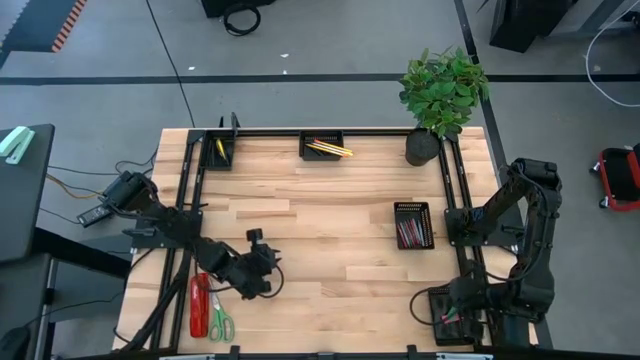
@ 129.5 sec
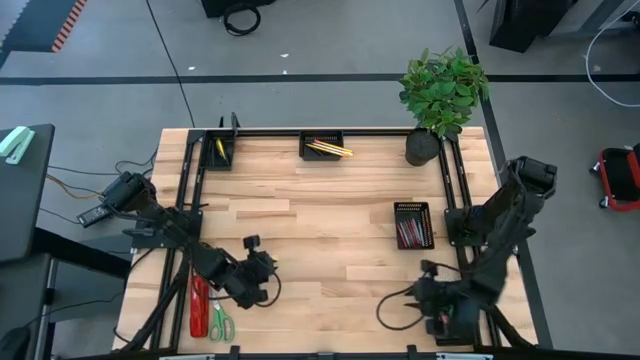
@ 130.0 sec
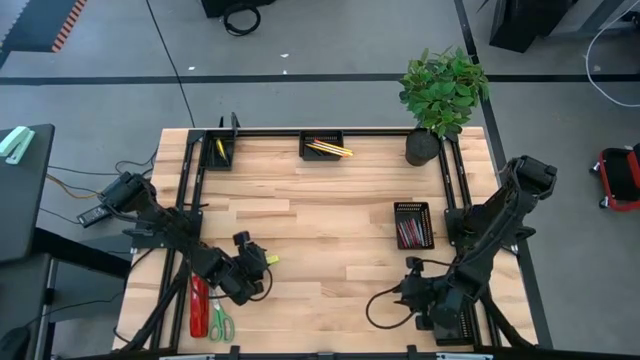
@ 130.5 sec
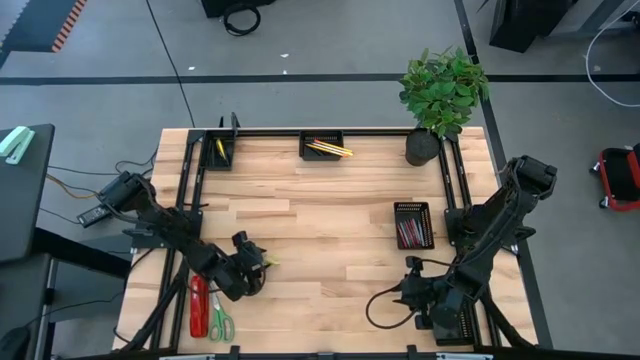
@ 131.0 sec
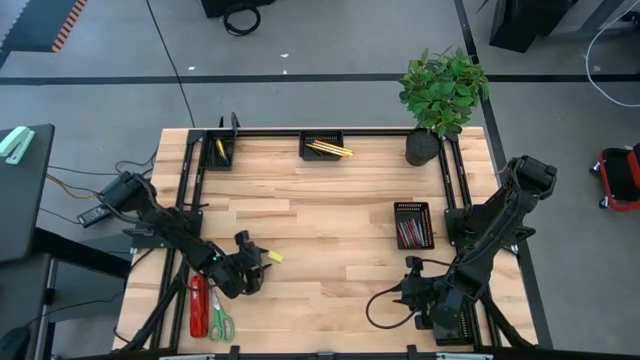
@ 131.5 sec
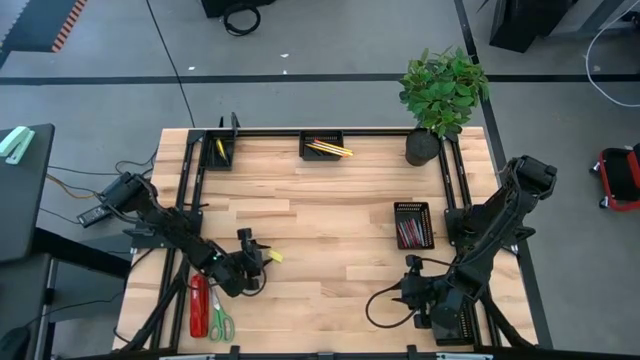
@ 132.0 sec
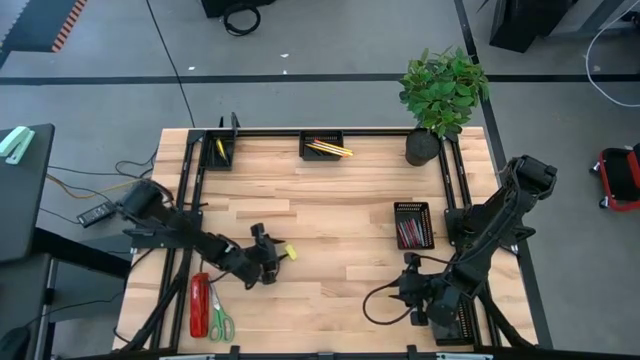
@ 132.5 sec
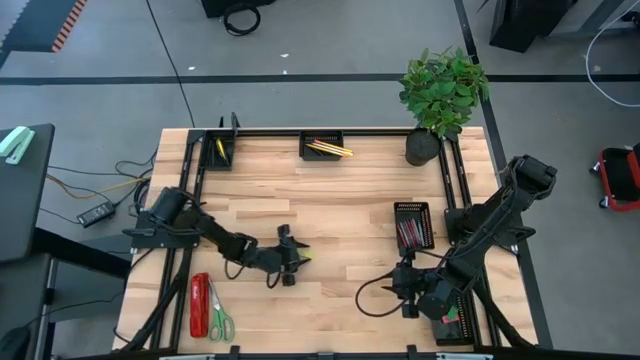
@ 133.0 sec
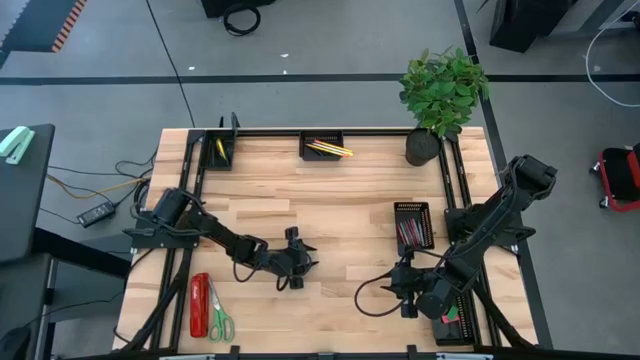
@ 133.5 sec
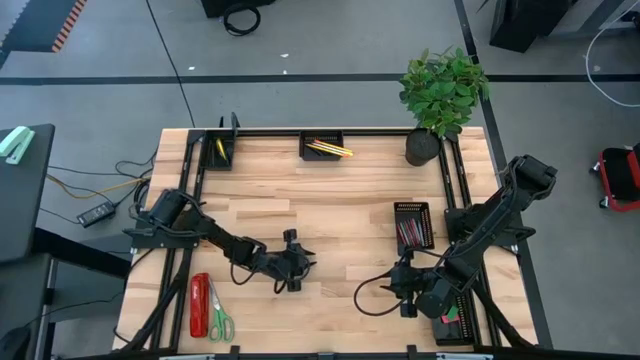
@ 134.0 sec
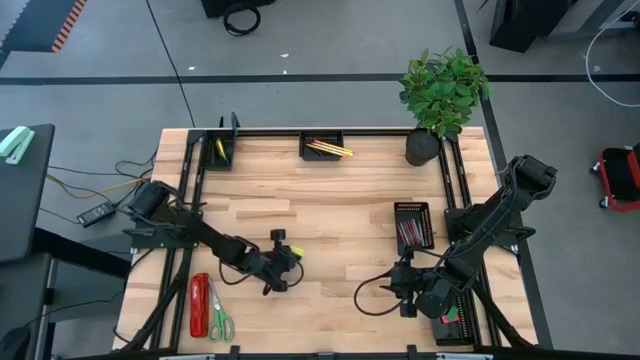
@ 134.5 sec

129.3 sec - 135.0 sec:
Task: Sort crayons/erasers/pens/pencils in bins
Put the light green eraser into the bottom right black bin

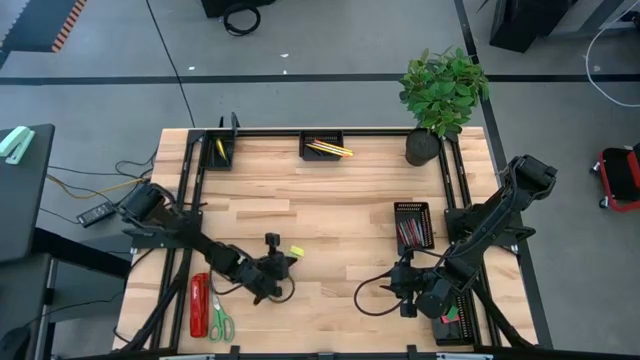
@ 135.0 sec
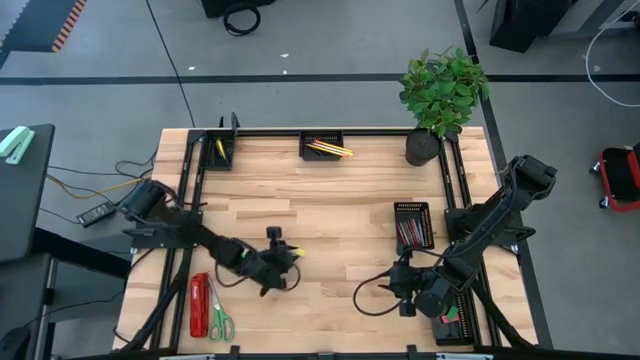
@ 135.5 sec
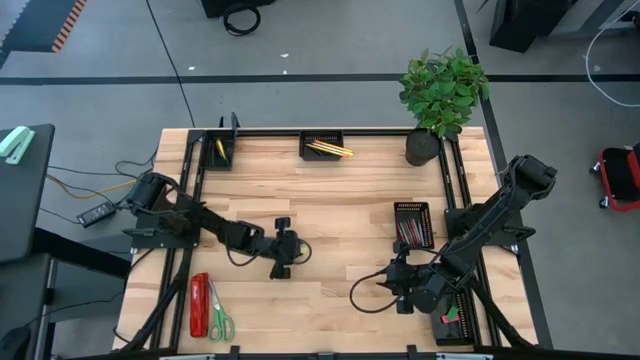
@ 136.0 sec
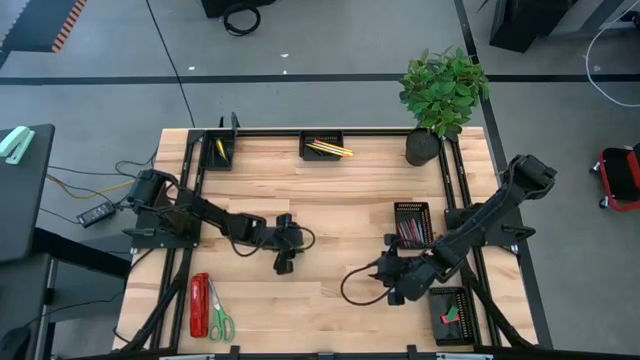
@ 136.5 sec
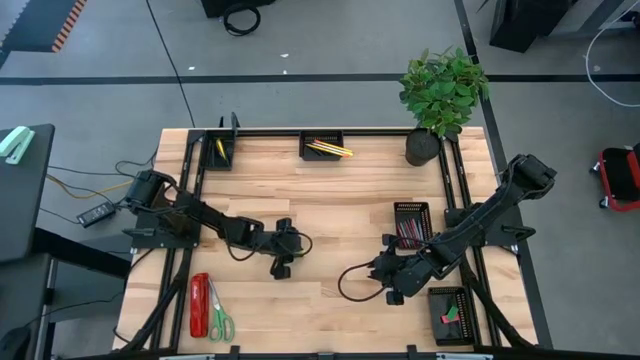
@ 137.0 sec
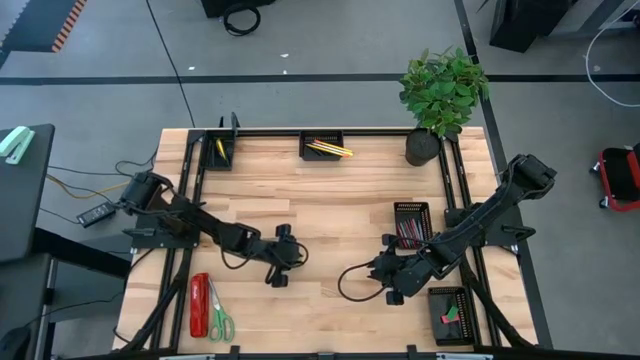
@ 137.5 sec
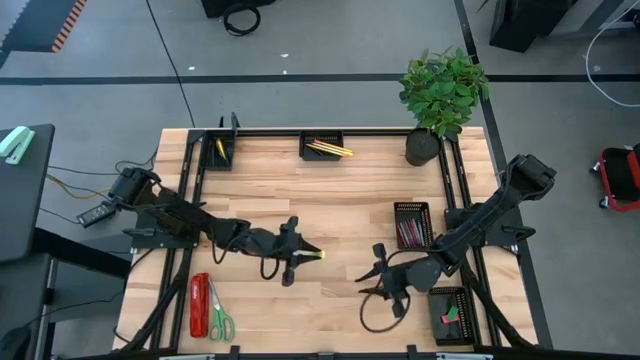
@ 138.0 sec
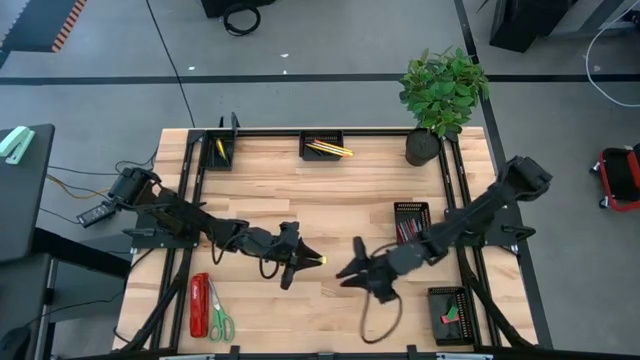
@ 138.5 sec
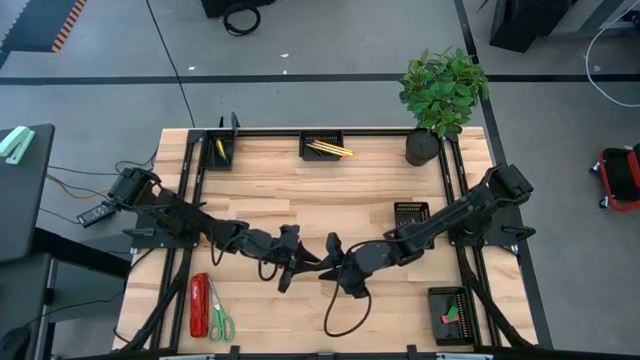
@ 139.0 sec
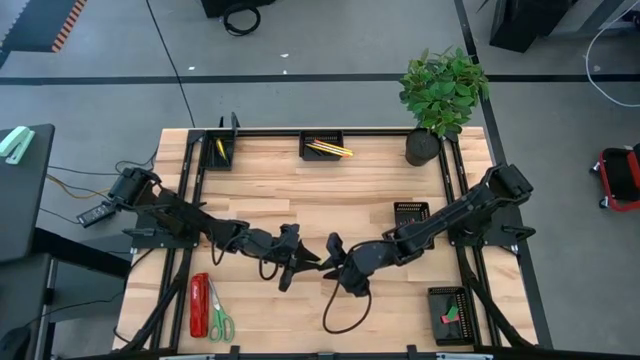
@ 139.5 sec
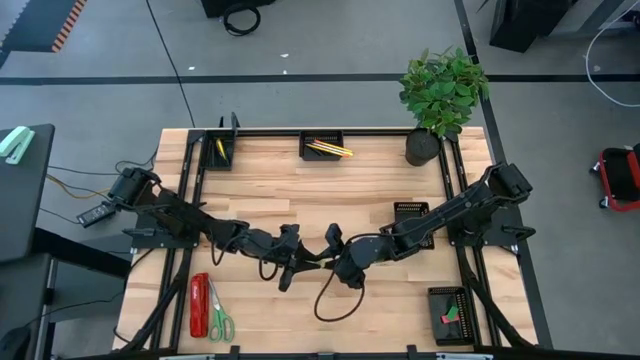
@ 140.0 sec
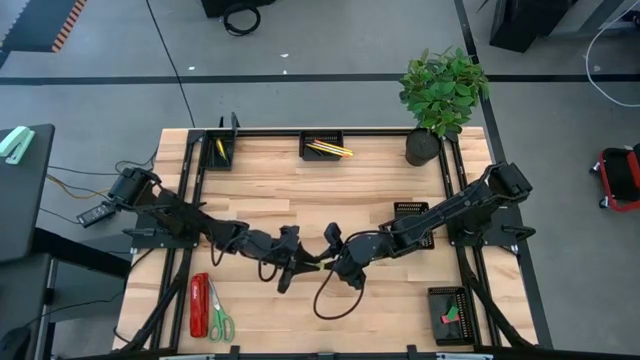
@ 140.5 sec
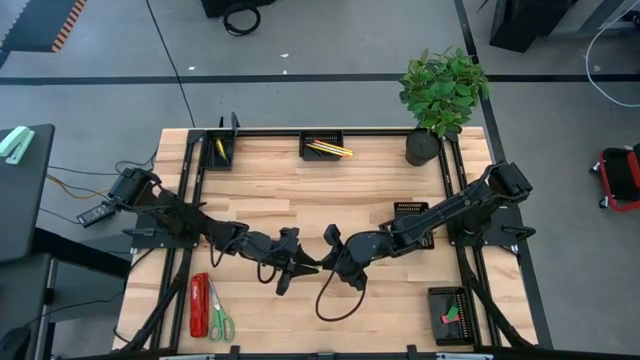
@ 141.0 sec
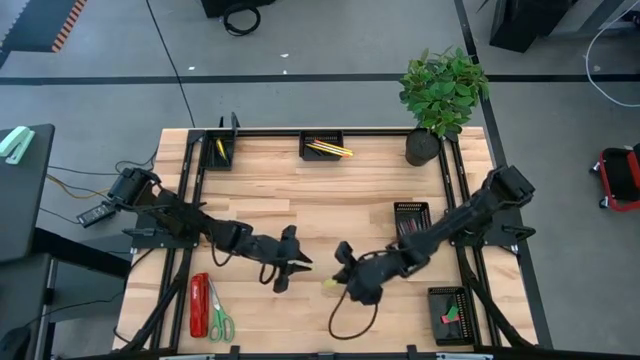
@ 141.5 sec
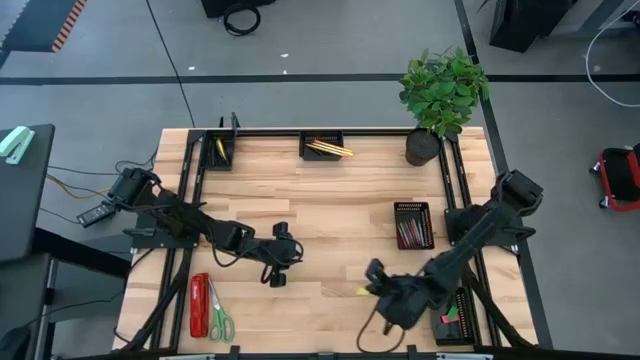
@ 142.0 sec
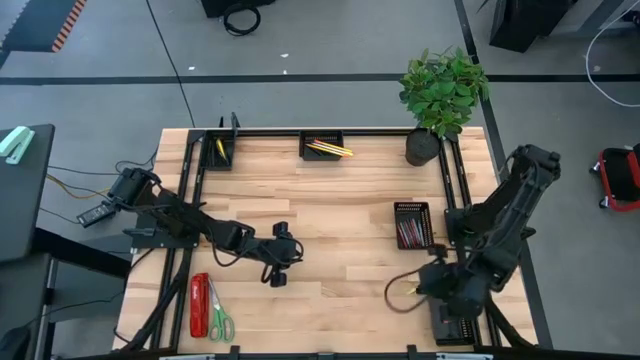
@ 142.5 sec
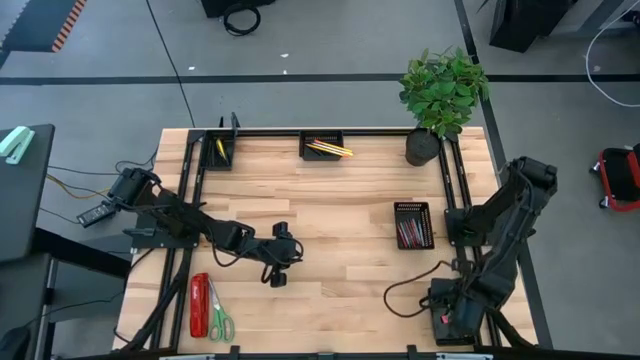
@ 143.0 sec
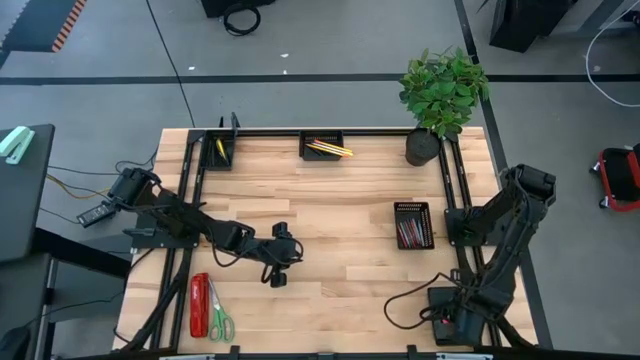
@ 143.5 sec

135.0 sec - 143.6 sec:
Put the light green eraser into the bottom right black bin

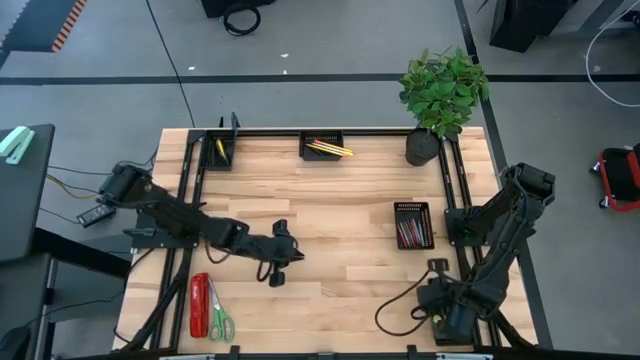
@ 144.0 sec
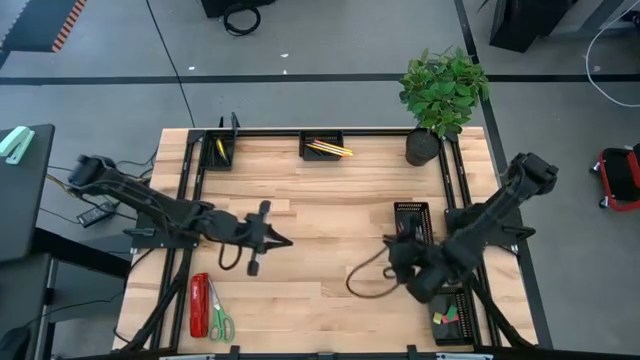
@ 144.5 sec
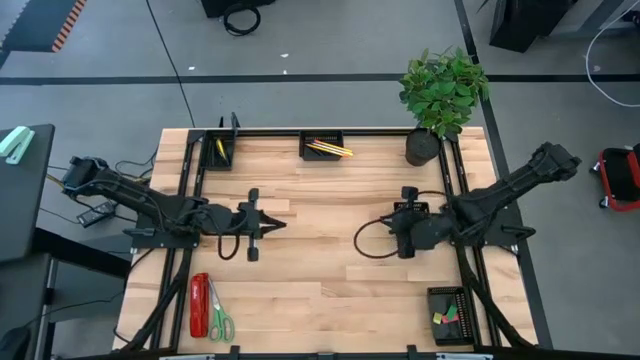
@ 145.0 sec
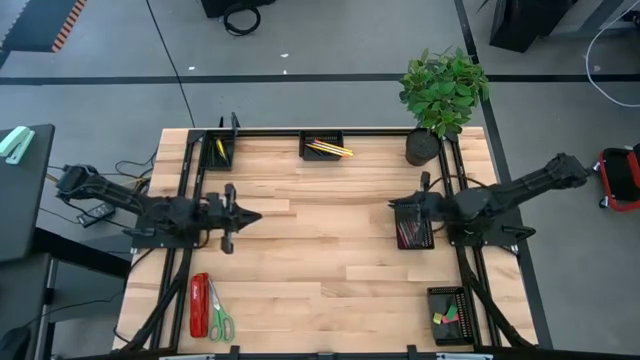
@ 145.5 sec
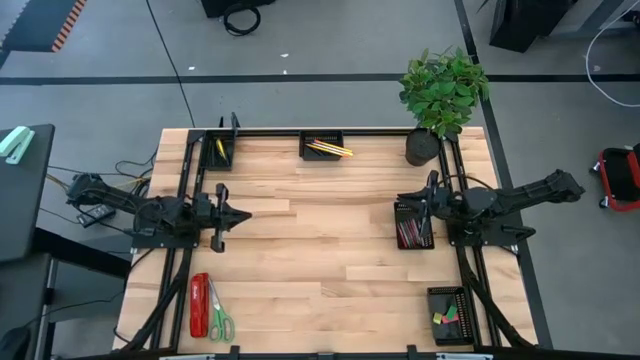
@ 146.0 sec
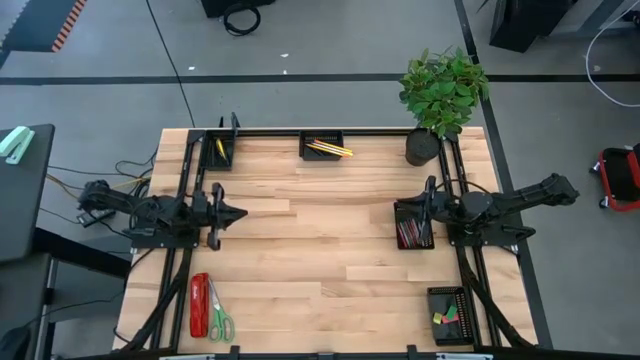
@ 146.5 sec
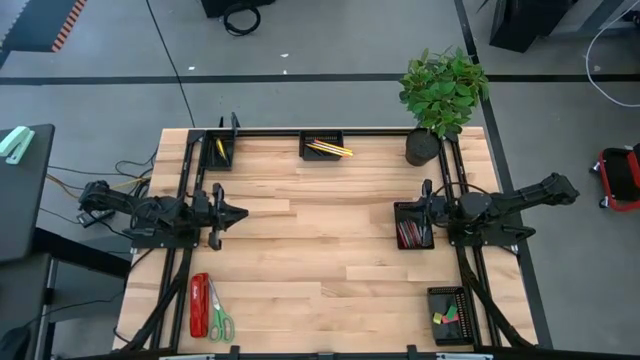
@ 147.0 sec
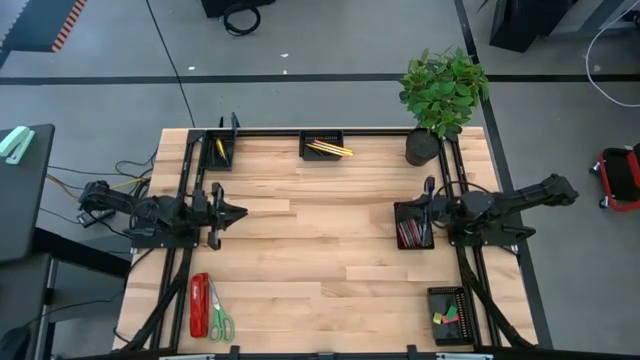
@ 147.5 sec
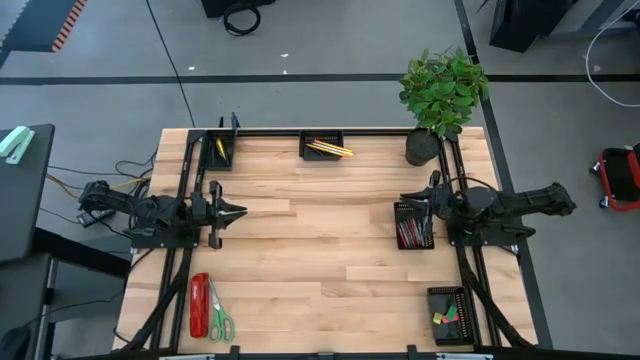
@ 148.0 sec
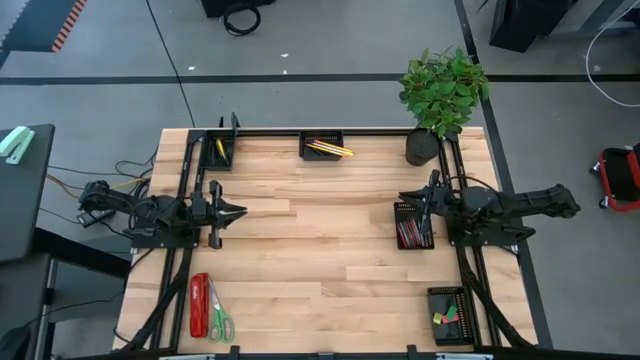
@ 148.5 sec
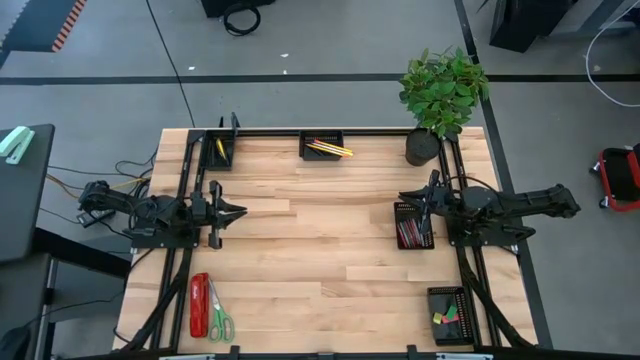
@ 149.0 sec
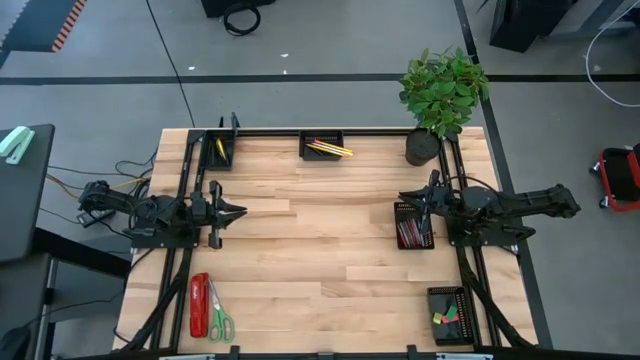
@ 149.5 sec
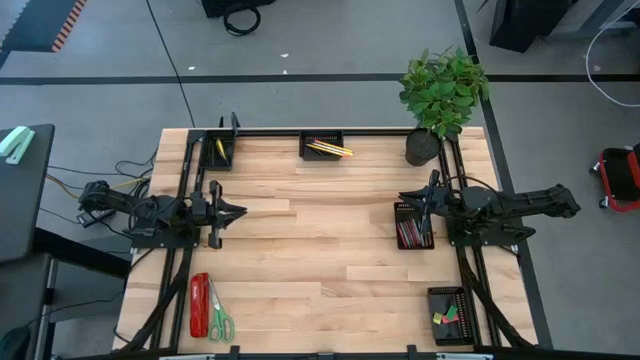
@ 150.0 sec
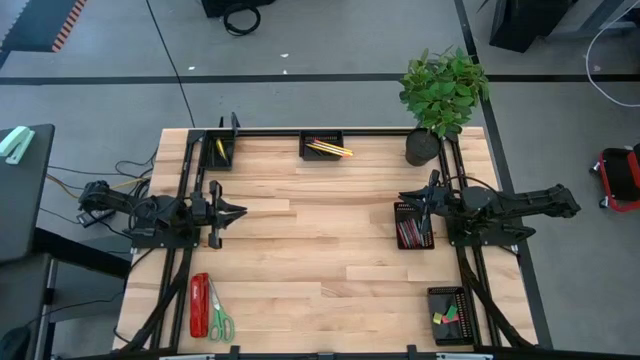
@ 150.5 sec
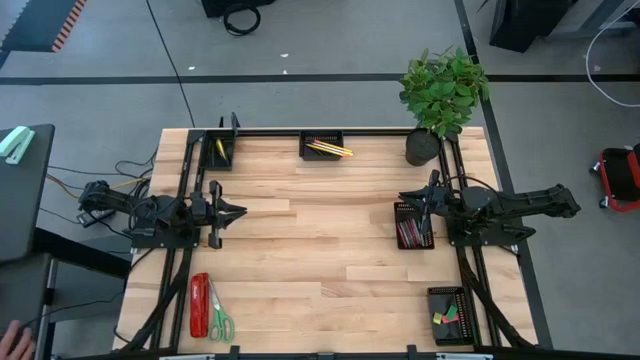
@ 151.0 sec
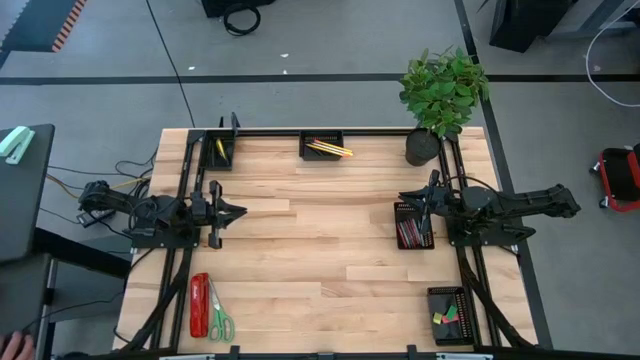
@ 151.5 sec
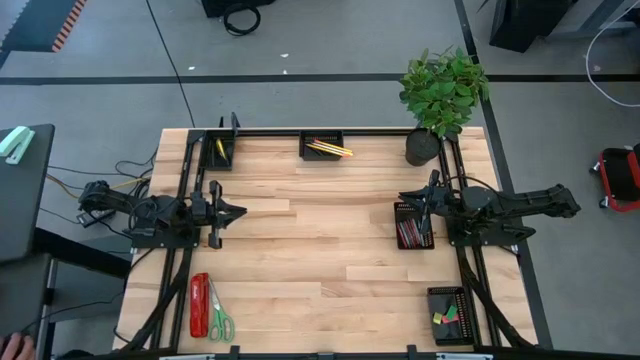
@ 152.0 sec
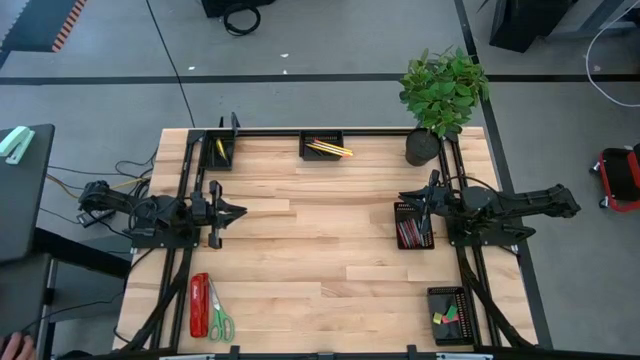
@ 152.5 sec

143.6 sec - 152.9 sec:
Return to Home Position
